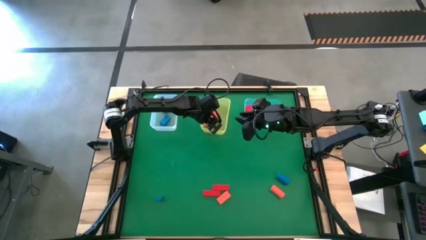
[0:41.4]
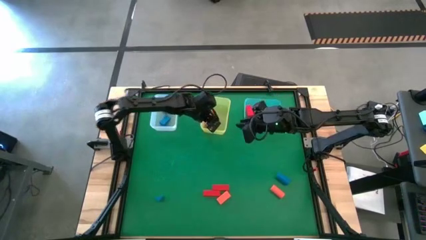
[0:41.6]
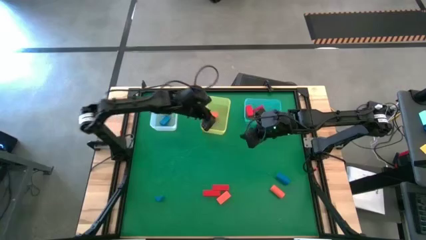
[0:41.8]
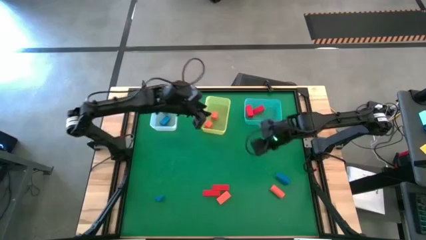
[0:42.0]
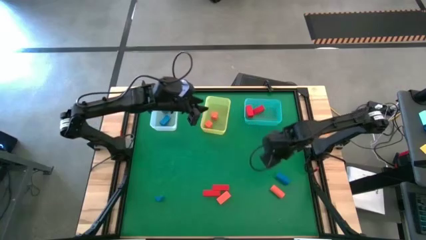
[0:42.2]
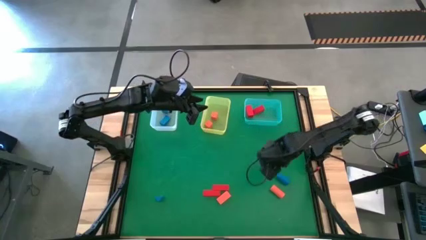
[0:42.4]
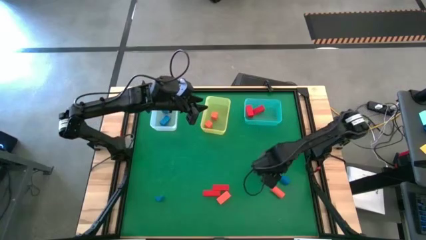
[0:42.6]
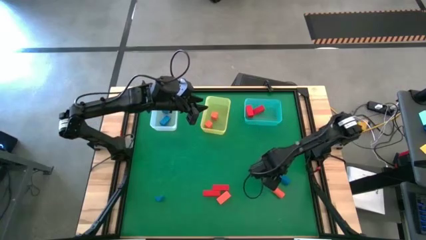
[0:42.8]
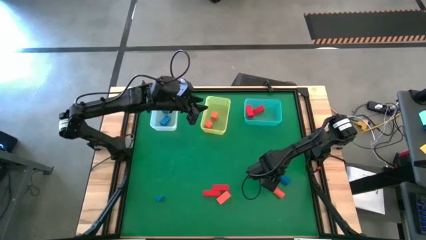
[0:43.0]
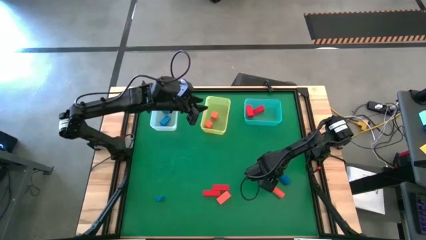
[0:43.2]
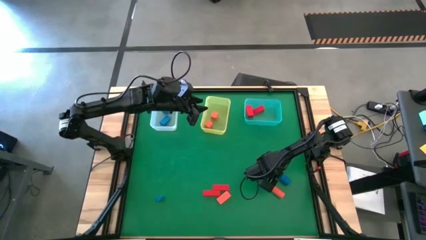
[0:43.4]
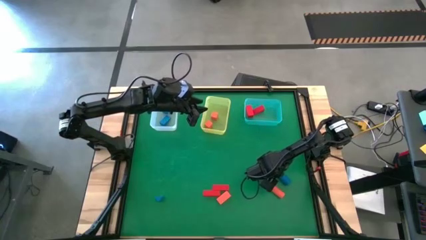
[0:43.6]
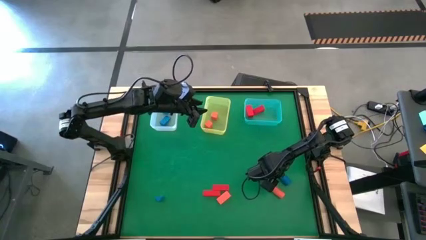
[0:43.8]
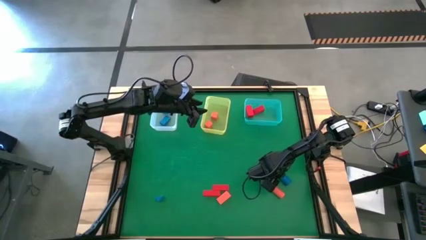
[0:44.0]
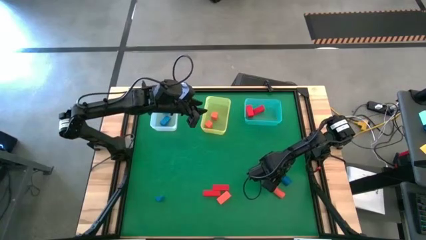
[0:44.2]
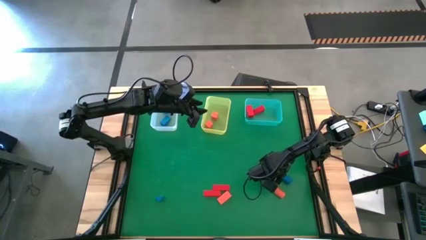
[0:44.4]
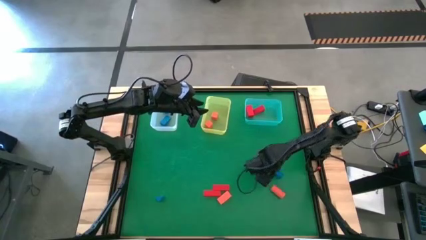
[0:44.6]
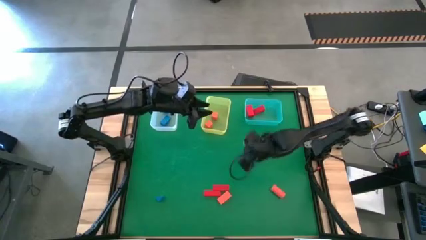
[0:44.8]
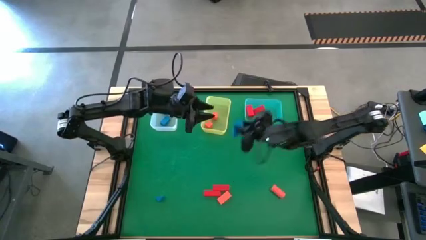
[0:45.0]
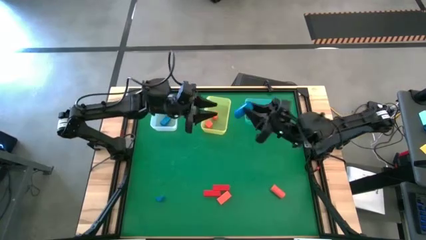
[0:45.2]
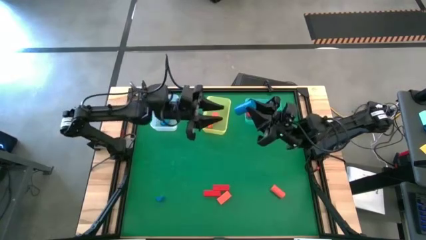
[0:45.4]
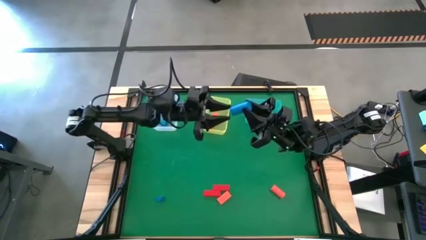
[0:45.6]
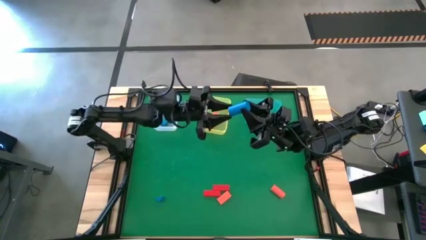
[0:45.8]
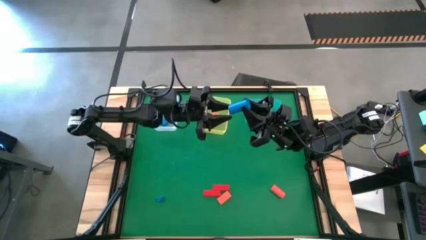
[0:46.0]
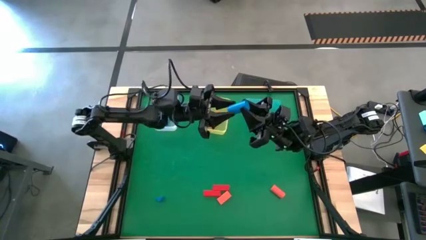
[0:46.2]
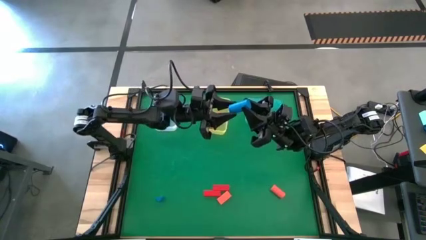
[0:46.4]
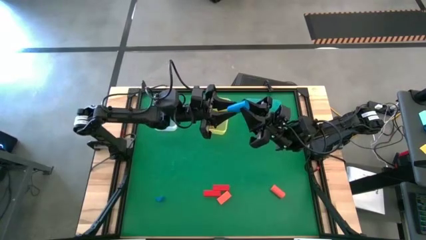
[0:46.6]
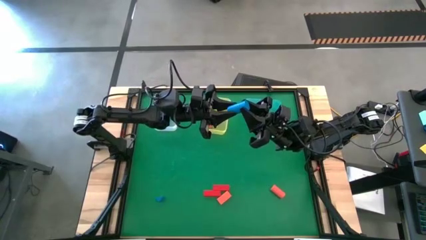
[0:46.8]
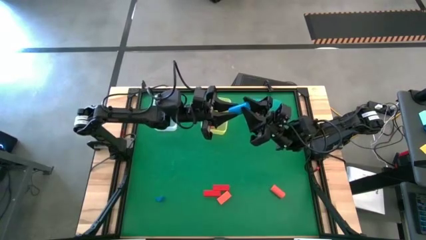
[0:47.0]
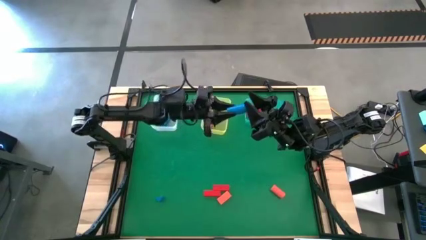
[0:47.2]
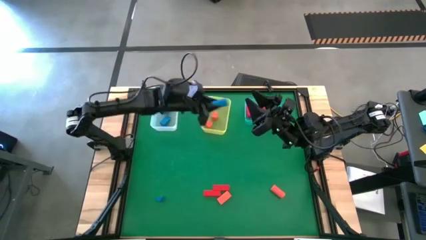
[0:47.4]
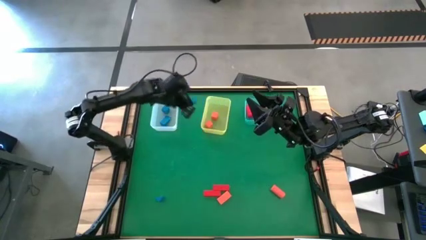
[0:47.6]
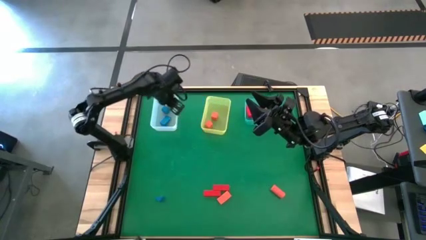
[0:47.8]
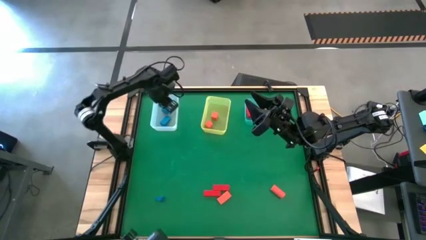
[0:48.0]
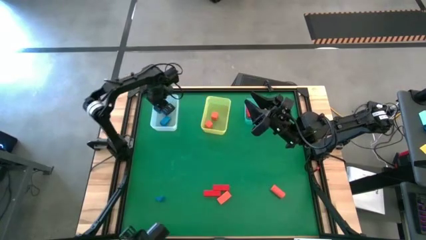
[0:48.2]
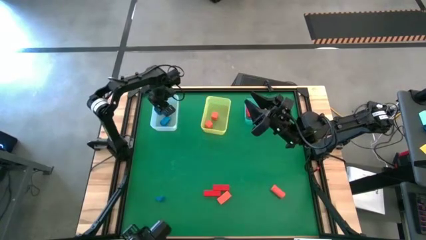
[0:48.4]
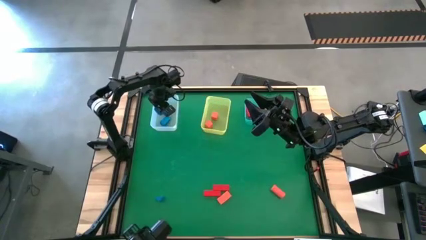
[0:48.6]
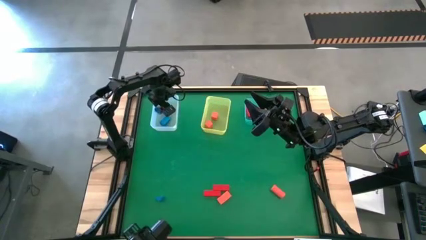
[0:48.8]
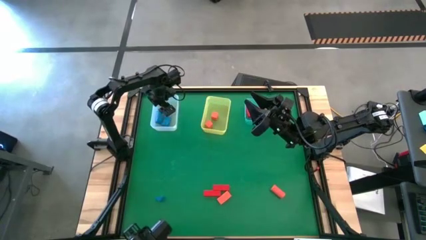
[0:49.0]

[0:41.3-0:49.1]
Task: Sort & place blocks by color
Put the blue block into the white bin

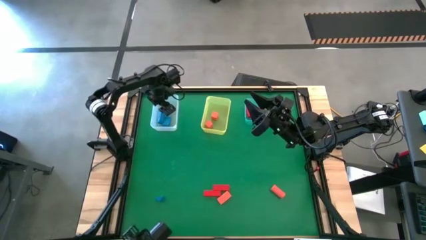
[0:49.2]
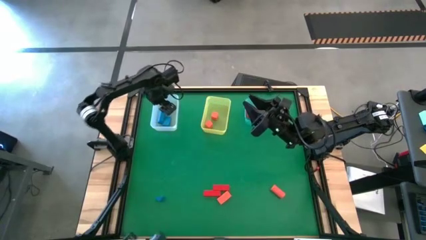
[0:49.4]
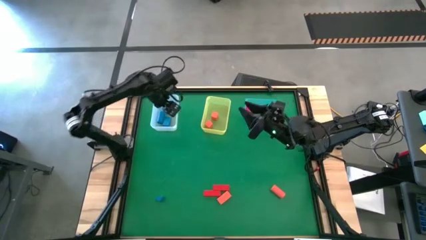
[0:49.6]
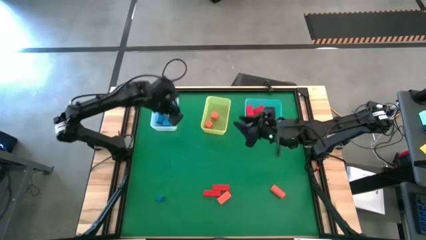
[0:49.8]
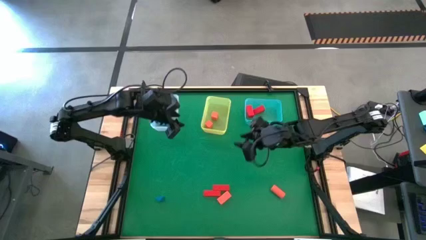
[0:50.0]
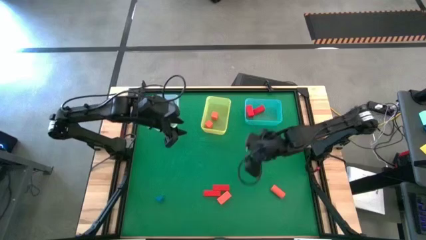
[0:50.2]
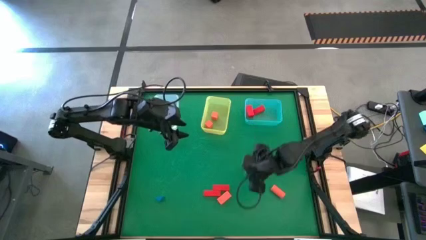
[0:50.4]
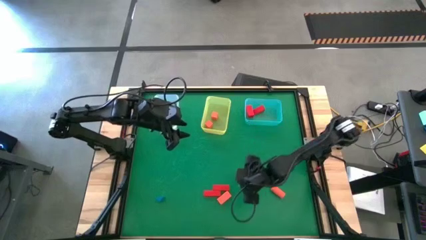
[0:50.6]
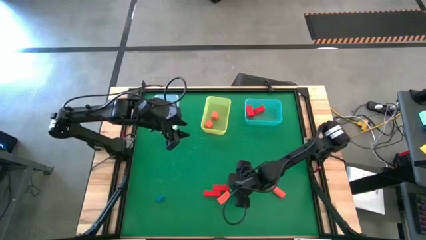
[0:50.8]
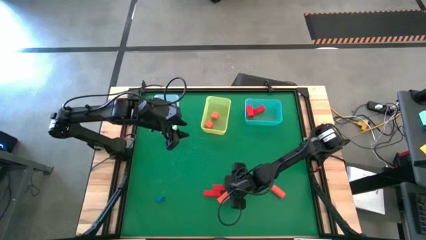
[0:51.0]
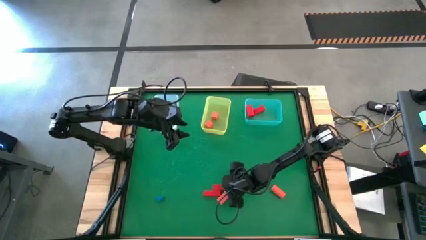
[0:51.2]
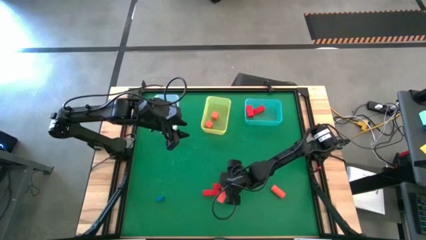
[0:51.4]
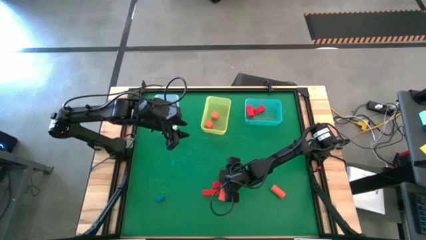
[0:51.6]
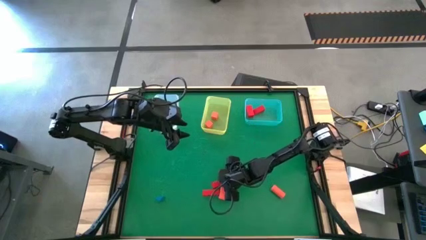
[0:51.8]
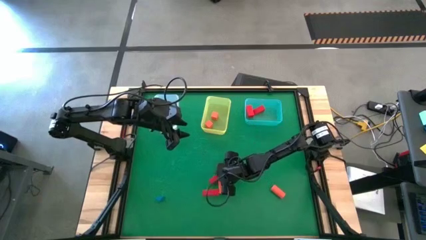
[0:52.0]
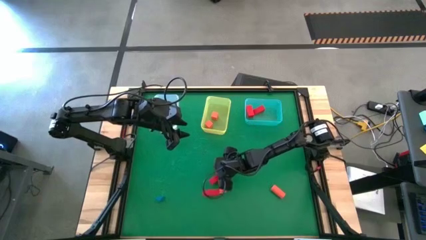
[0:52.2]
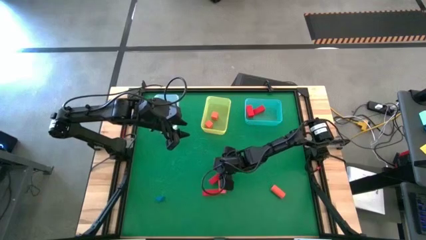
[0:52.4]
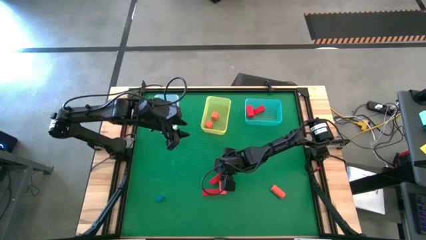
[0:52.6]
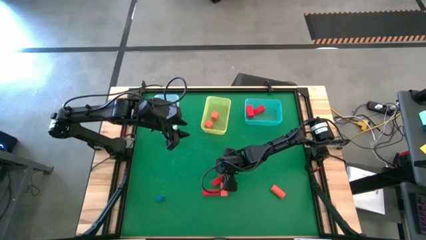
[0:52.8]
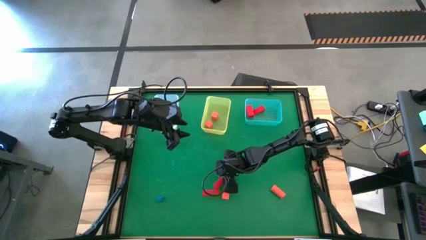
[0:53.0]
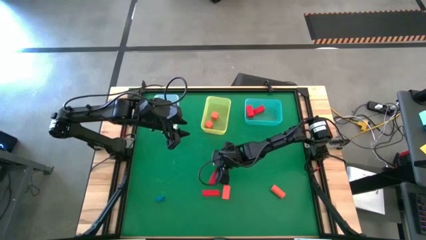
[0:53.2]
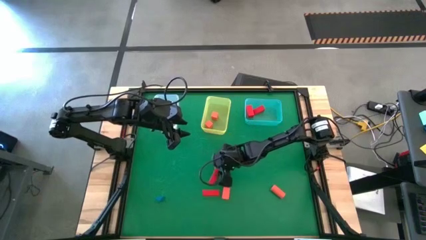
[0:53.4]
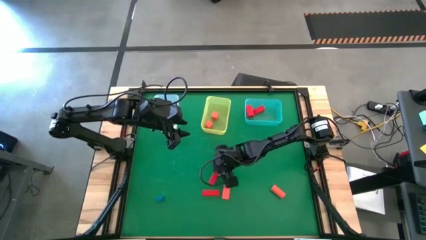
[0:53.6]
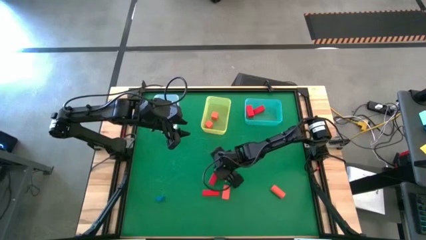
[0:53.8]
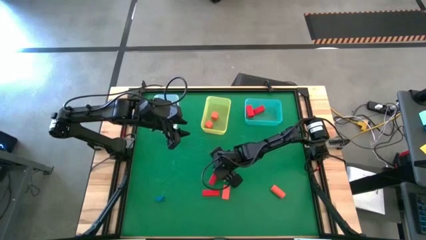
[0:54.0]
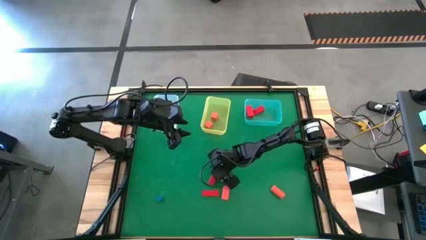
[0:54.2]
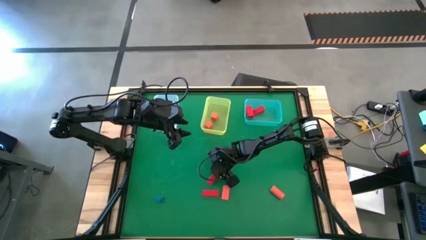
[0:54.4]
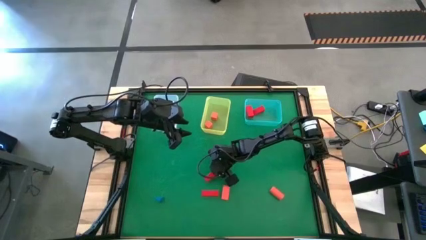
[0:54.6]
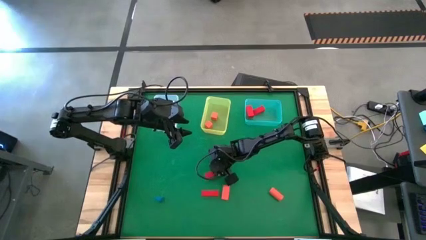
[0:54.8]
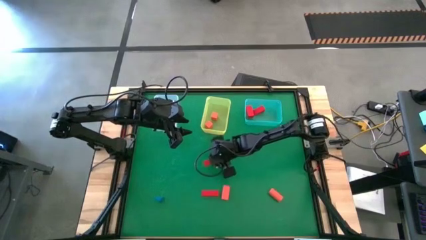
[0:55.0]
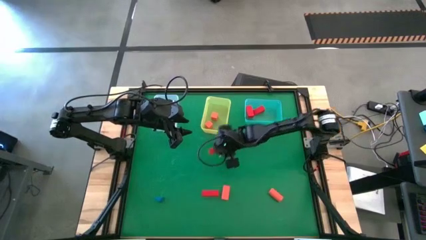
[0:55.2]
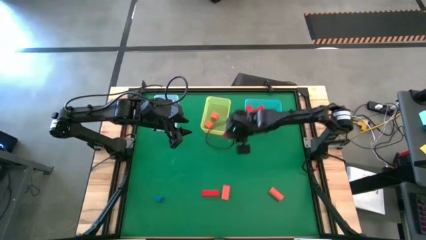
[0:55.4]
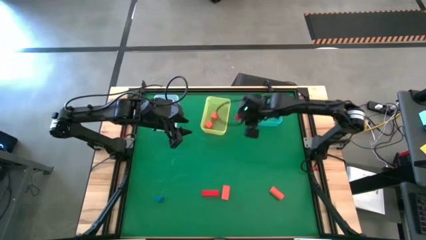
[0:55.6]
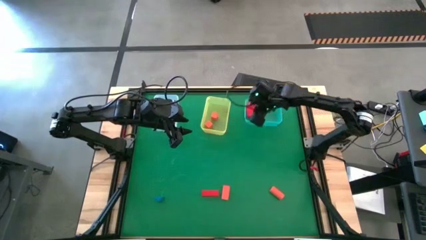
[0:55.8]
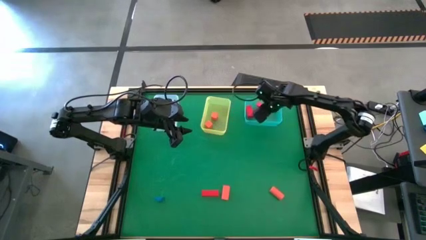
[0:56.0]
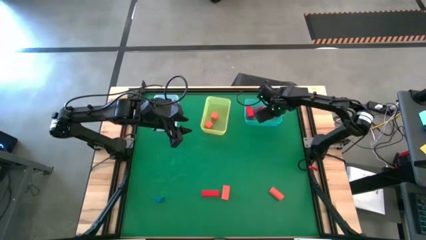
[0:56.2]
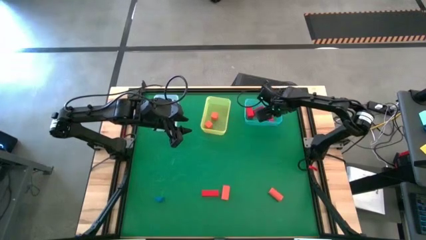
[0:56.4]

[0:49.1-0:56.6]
Put the red block into the blue bin

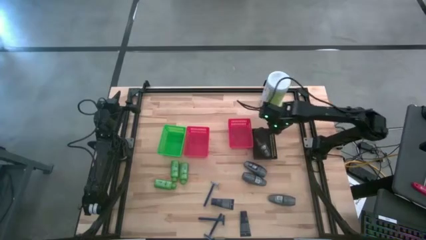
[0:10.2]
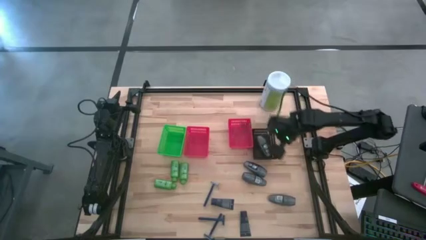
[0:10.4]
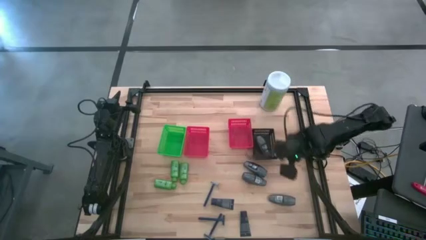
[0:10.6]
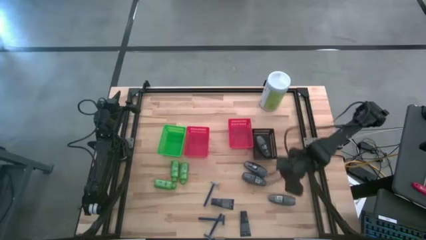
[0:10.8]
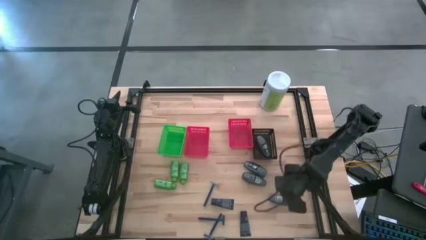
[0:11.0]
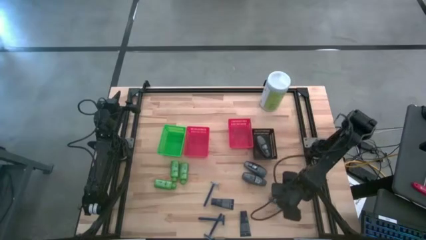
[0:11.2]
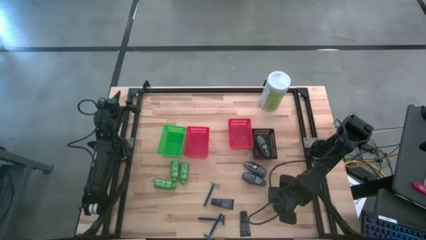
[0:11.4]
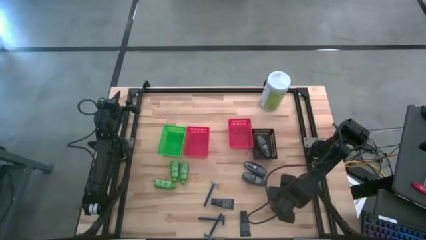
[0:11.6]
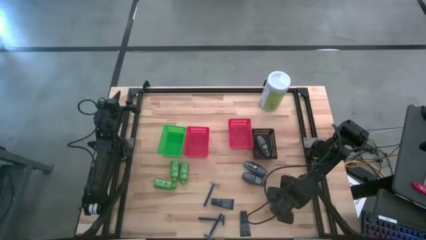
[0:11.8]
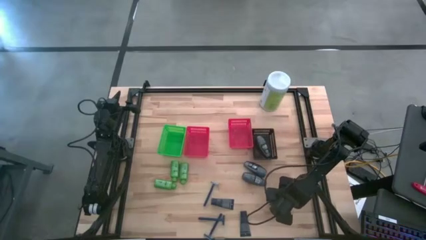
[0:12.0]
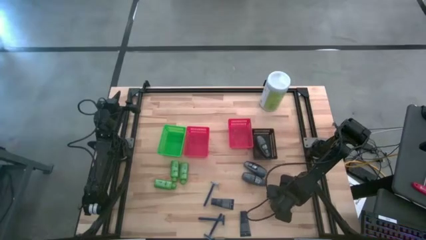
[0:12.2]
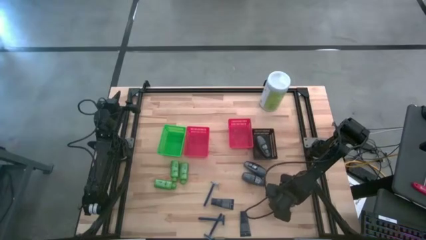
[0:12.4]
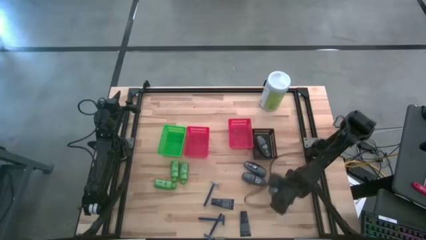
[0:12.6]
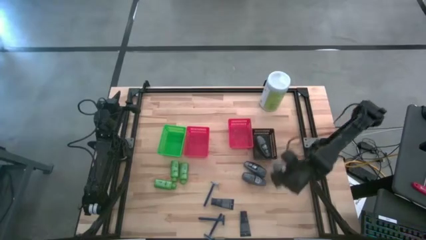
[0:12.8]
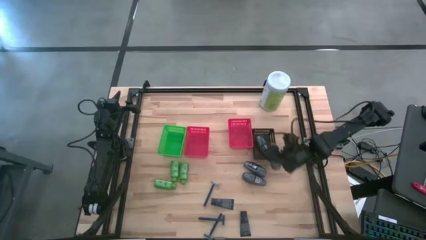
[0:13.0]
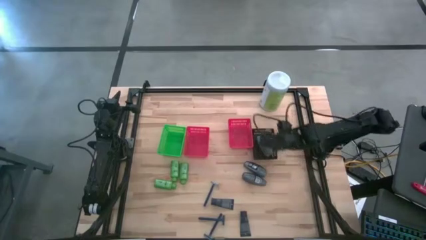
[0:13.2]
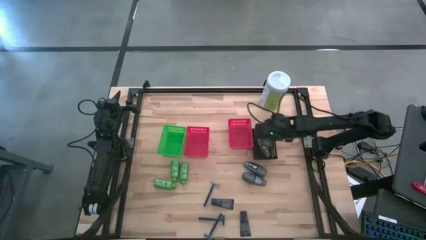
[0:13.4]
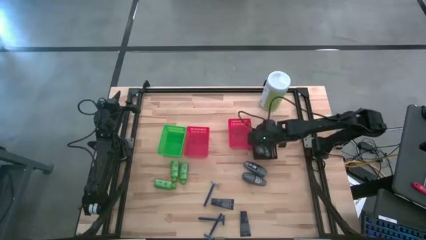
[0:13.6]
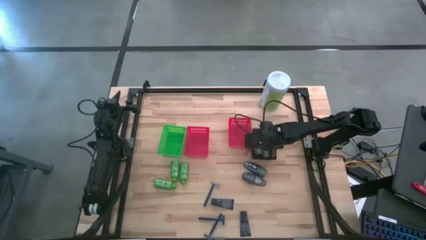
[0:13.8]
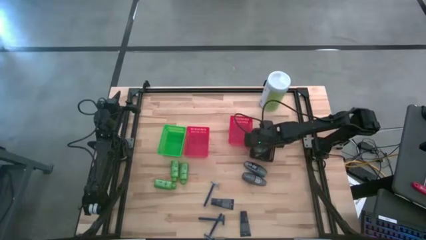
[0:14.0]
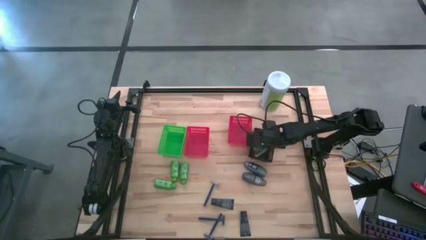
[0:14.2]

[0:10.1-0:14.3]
Task: Pick & Place Travel size toiletries
Put the gray deodorant into the black basket
